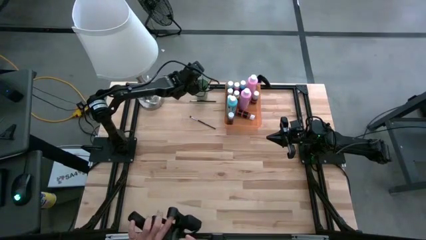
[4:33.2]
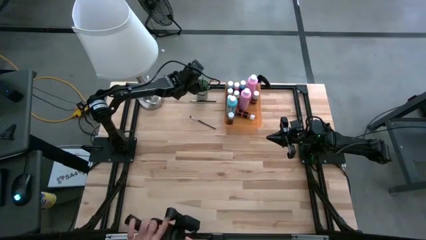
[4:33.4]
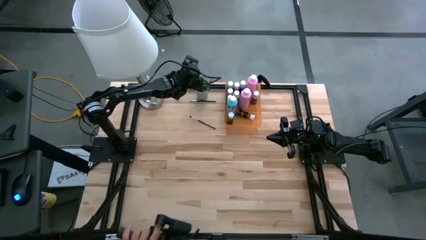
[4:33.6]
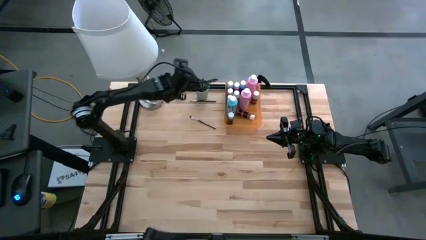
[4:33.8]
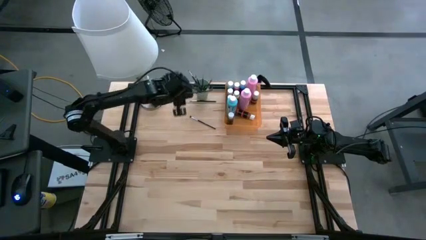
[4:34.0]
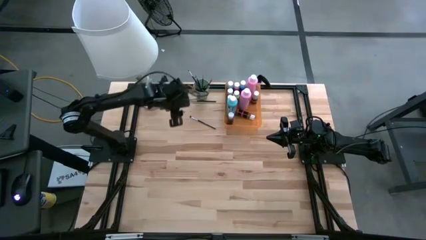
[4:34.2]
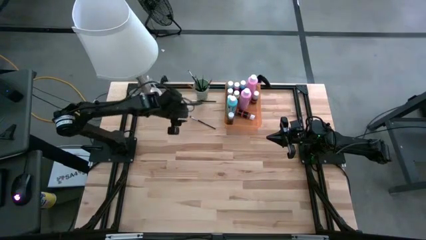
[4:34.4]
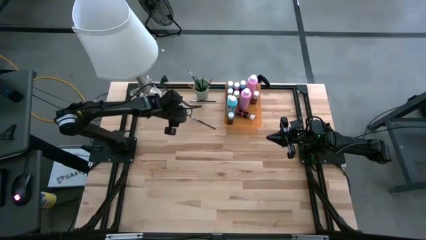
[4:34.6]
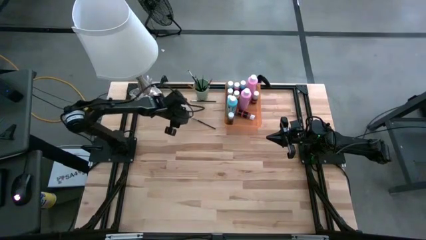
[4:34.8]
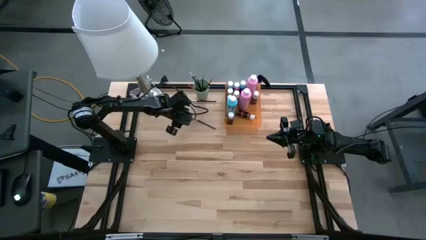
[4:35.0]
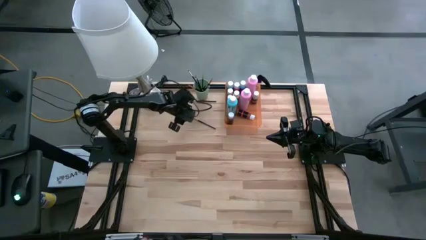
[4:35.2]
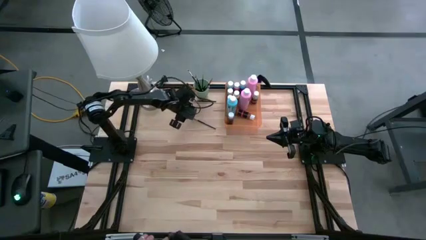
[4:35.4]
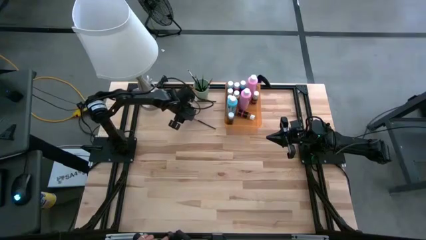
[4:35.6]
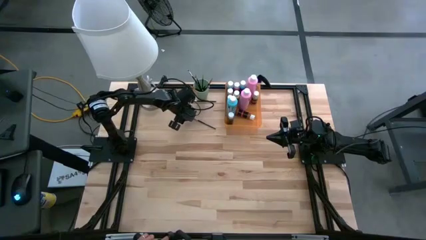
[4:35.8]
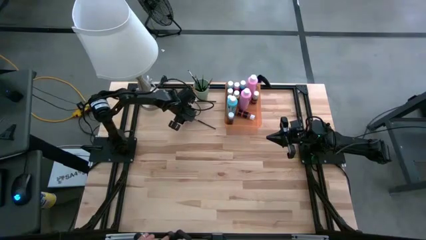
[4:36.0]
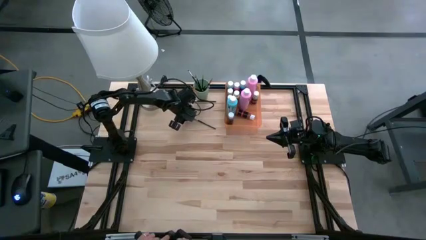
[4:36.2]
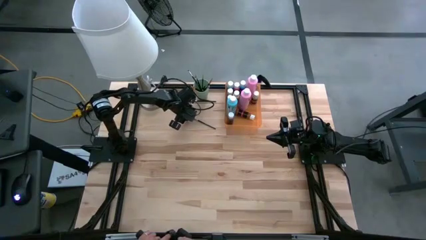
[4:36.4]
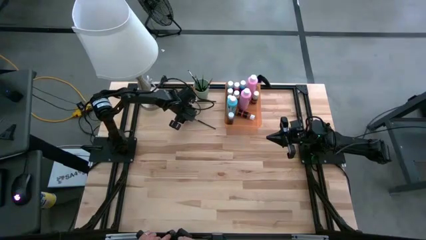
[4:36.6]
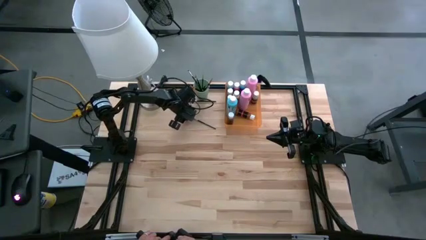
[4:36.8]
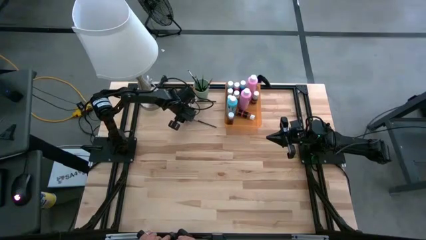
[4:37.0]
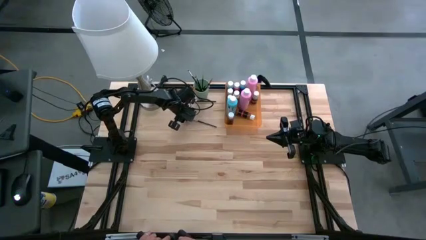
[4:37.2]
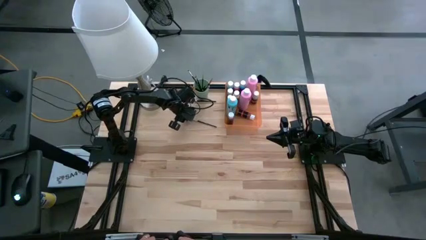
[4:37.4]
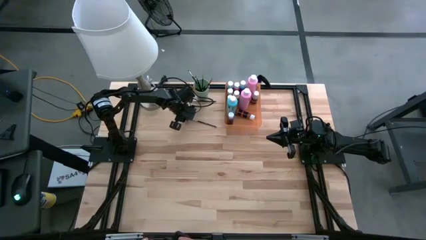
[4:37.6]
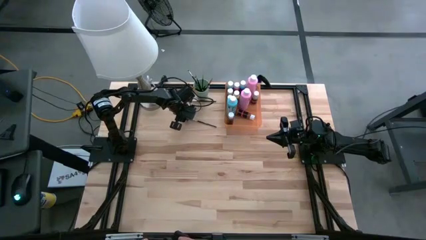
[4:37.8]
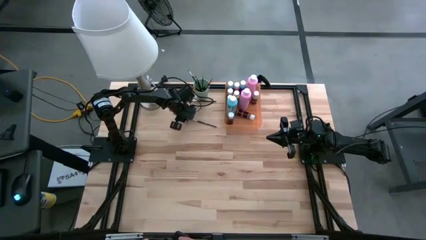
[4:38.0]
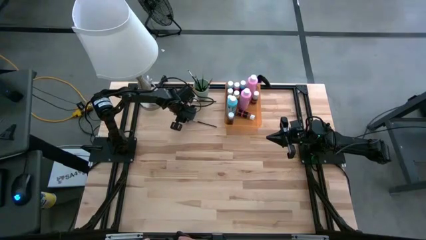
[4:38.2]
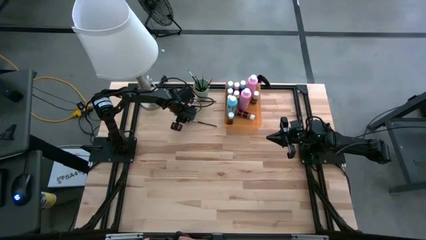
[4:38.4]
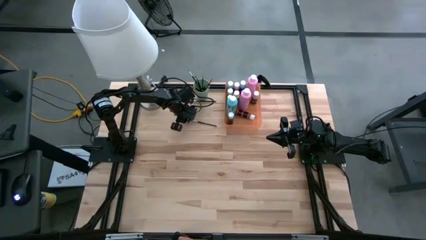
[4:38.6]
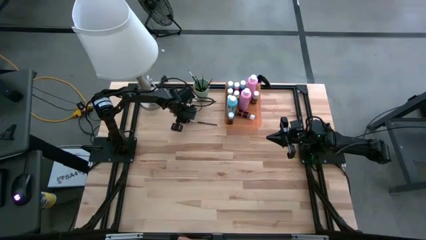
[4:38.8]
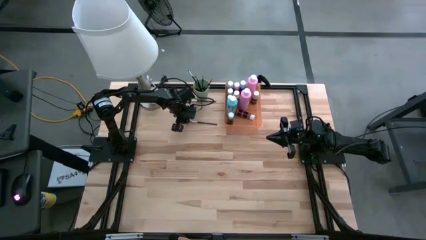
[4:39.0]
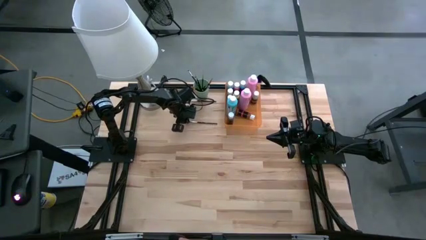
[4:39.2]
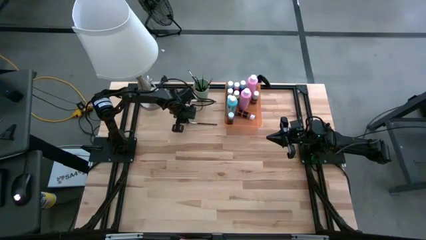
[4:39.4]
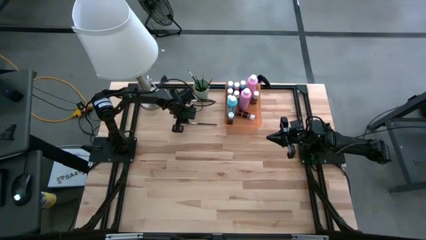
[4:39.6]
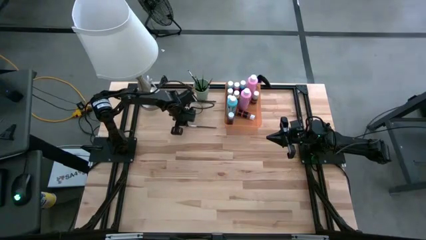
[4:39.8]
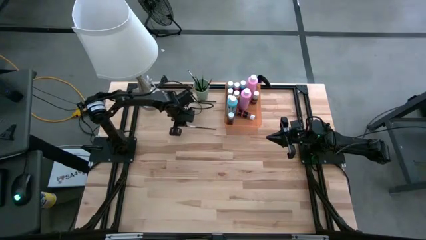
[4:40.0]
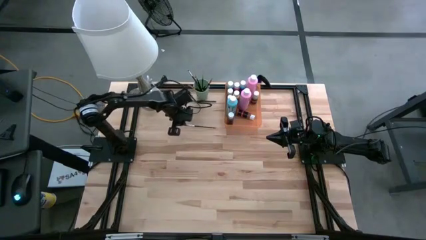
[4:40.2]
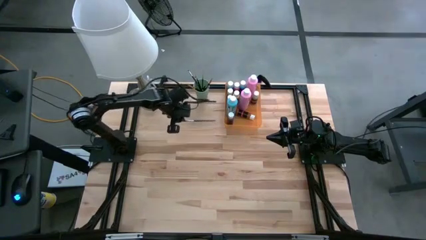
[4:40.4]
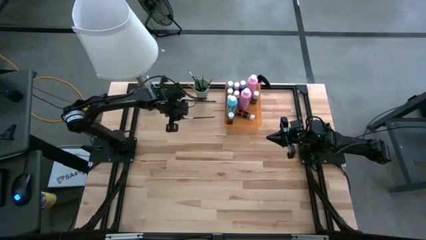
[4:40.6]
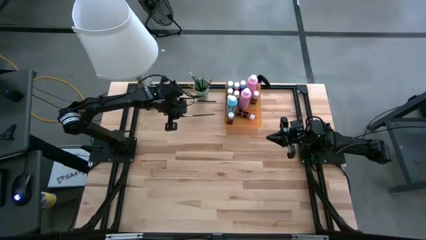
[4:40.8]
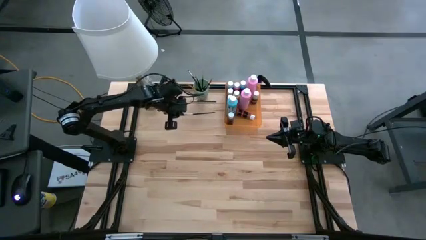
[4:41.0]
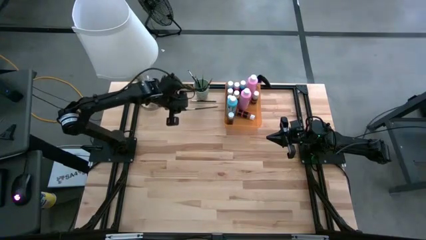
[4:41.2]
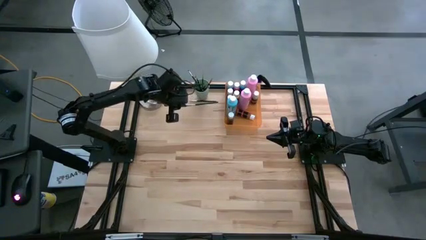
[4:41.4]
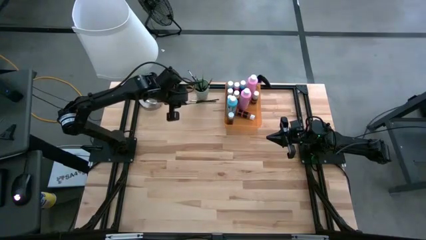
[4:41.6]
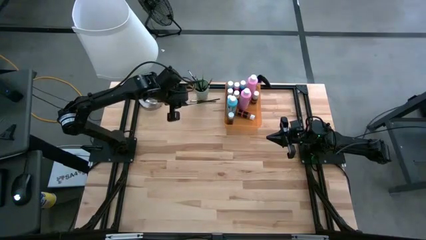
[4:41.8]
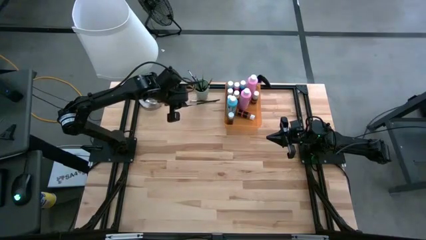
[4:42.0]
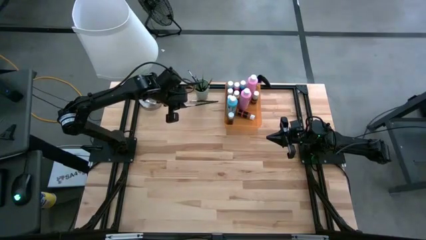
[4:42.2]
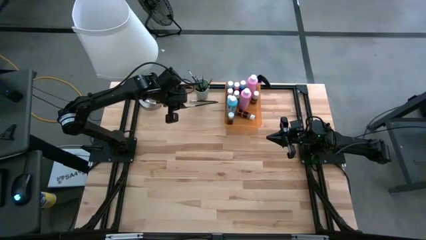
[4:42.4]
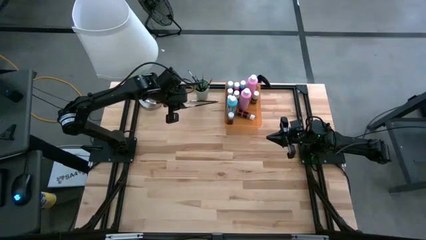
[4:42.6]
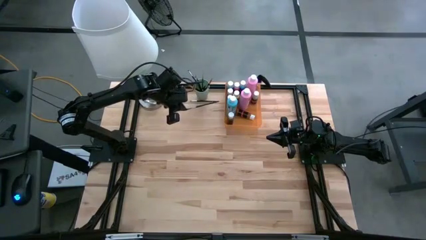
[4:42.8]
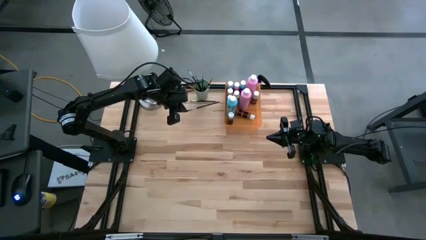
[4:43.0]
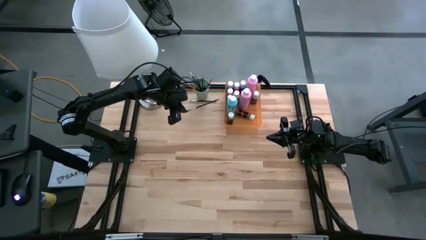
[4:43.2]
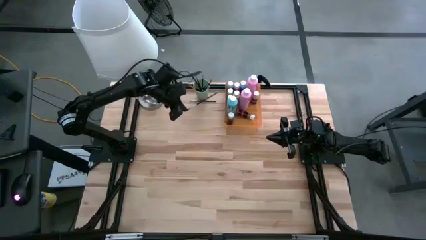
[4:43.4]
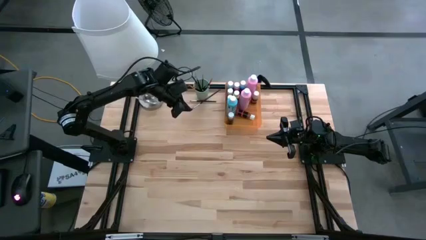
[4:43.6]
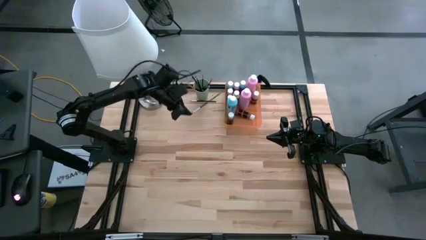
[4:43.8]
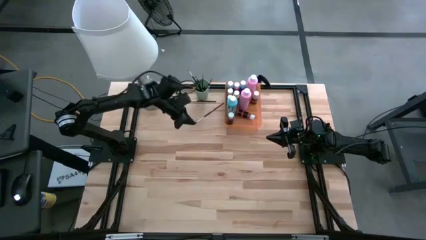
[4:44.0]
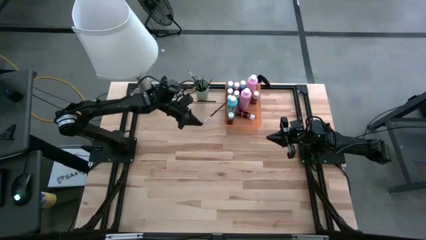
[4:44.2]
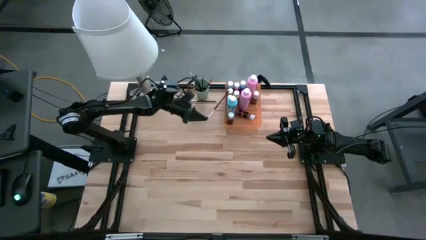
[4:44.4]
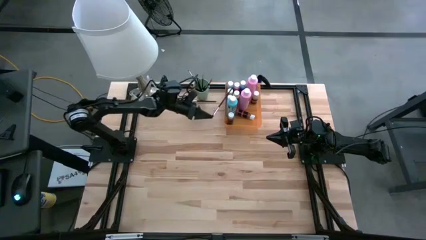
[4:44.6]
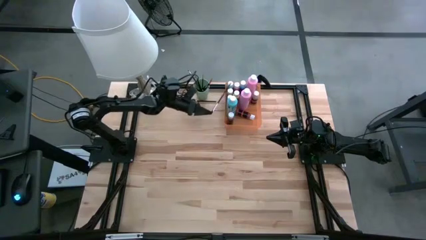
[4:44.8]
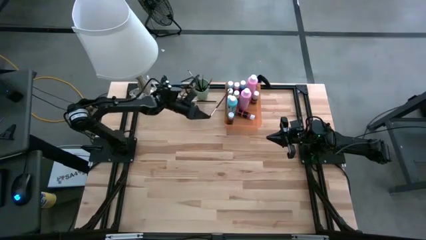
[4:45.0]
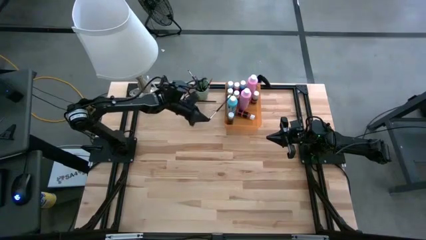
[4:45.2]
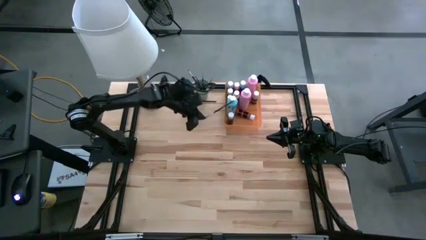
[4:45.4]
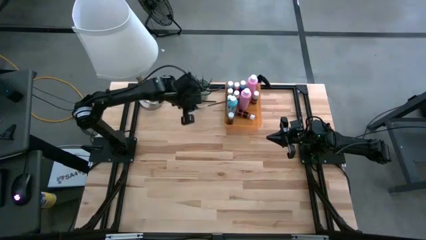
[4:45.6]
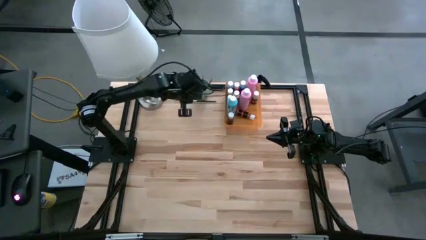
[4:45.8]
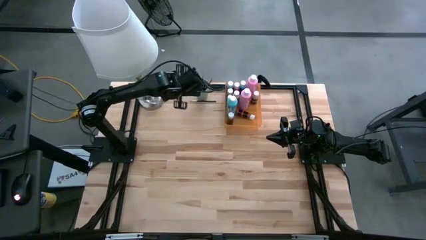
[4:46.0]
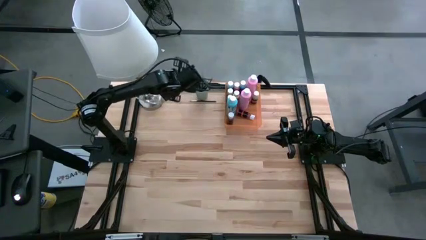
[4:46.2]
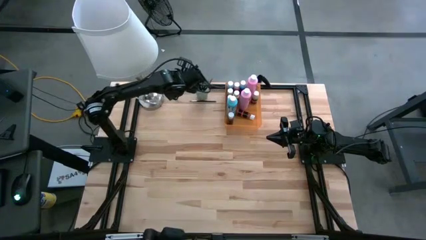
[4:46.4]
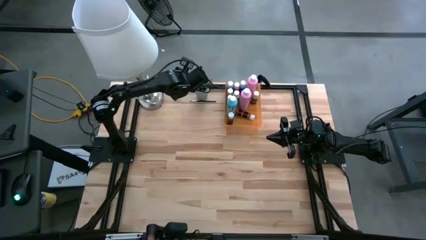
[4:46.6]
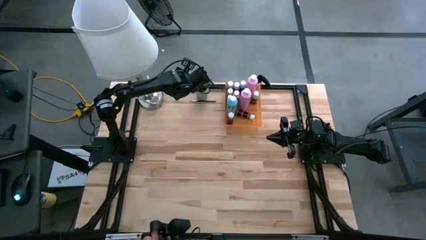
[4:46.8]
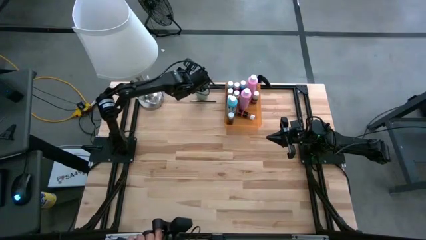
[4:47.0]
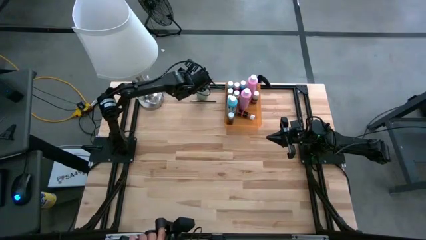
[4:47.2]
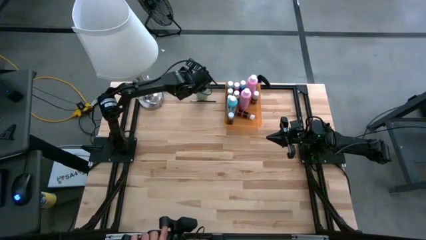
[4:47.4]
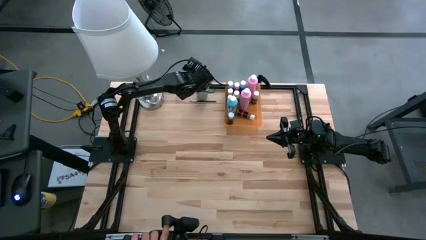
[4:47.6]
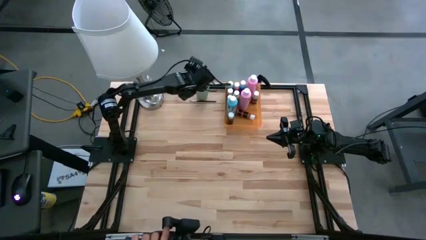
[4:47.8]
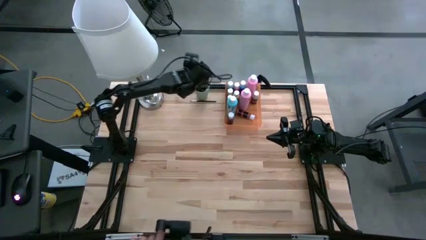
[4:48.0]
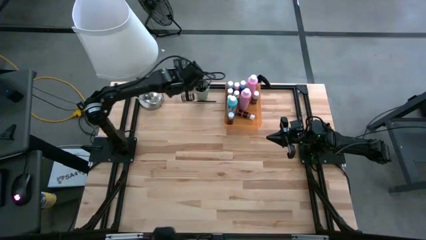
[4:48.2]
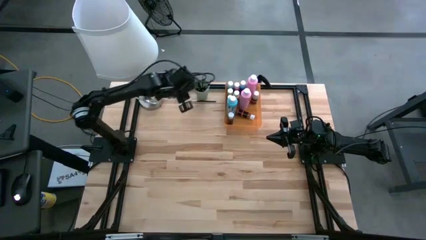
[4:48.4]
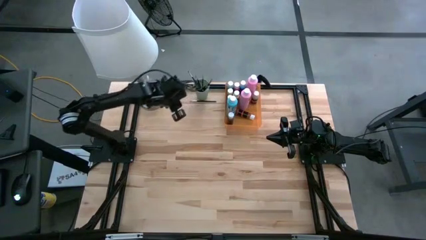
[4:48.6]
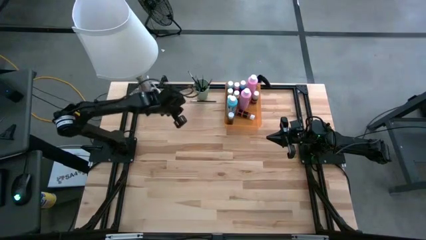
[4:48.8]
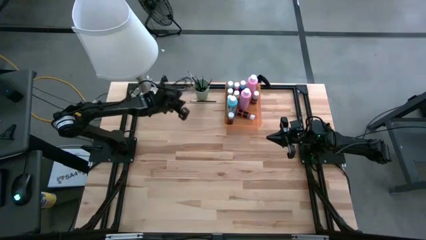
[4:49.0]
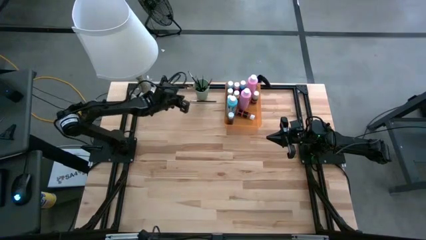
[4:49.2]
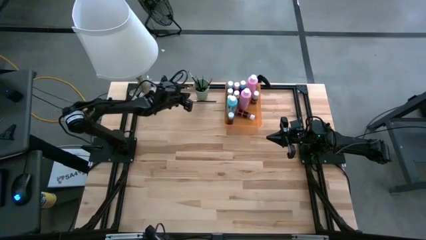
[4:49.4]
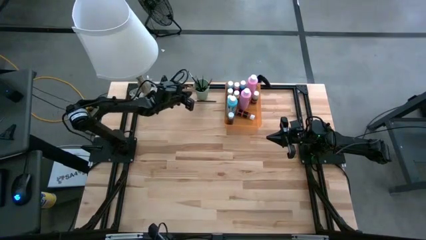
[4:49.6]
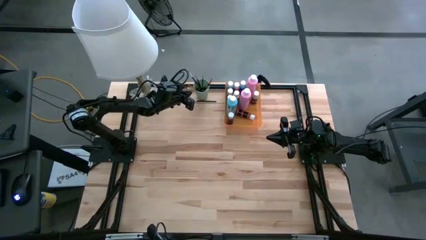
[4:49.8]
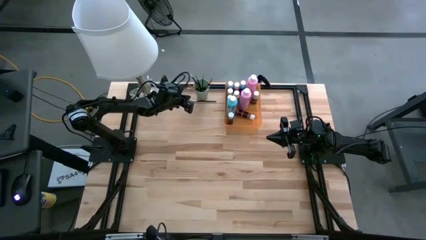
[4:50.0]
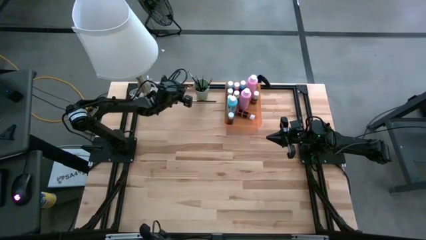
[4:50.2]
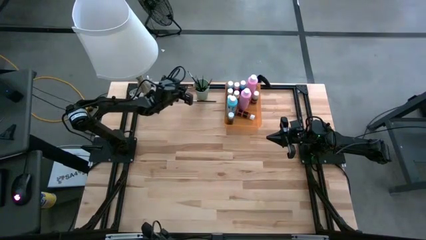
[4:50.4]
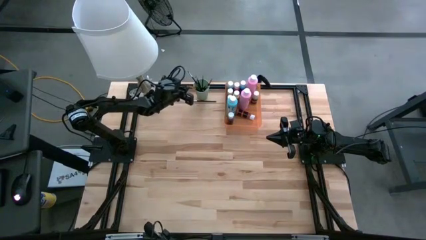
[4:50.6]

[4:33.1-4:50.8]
Task: Pick & Place Paint Supplies
Put the black paint brush into the green cup
